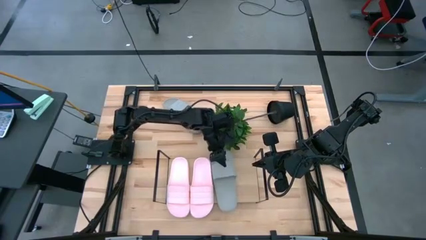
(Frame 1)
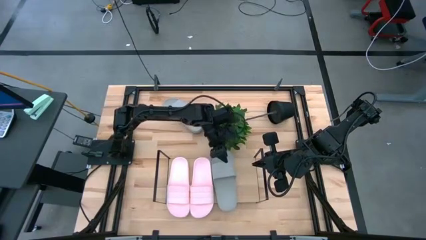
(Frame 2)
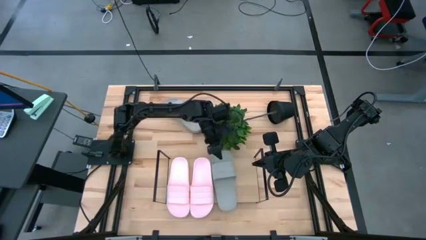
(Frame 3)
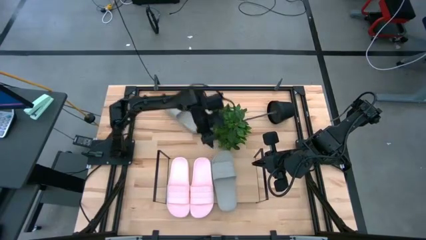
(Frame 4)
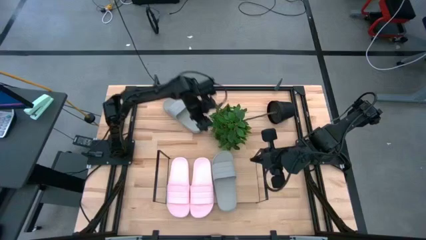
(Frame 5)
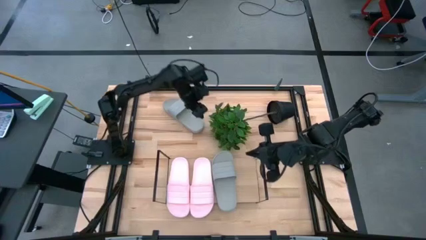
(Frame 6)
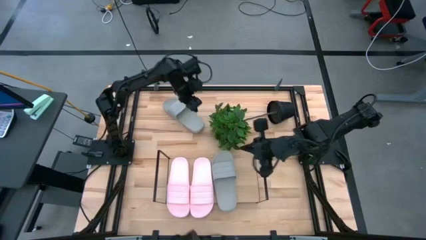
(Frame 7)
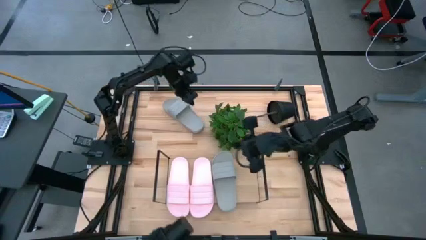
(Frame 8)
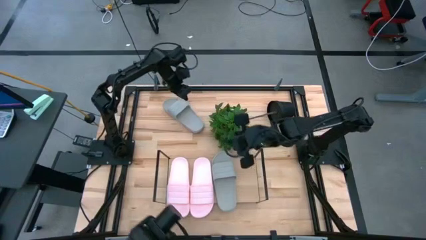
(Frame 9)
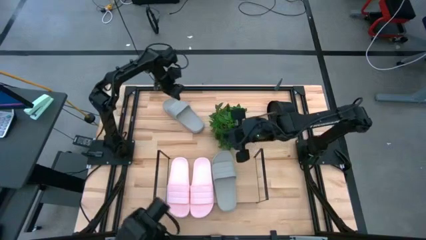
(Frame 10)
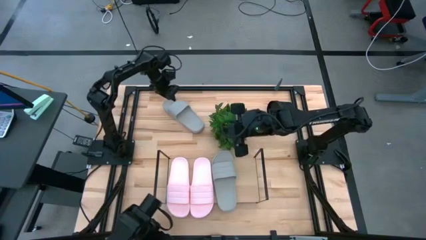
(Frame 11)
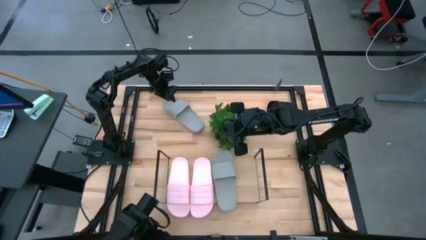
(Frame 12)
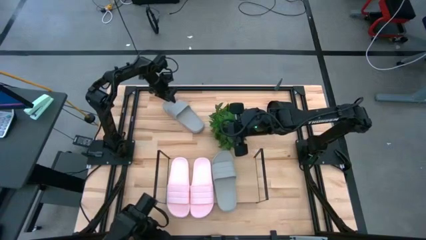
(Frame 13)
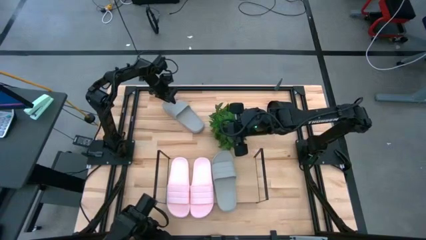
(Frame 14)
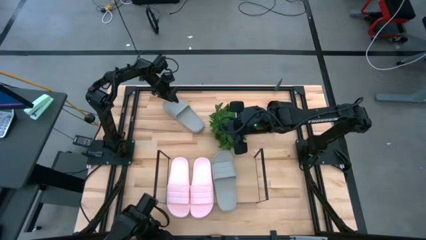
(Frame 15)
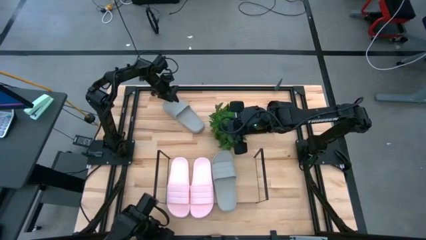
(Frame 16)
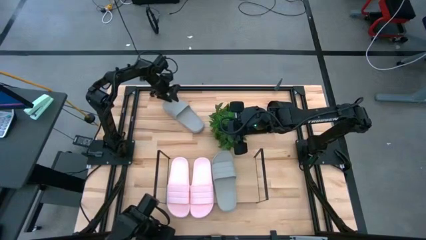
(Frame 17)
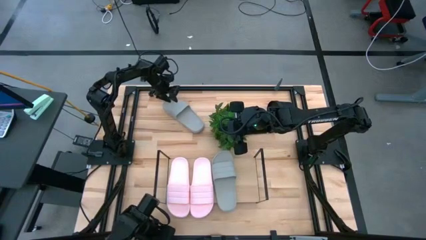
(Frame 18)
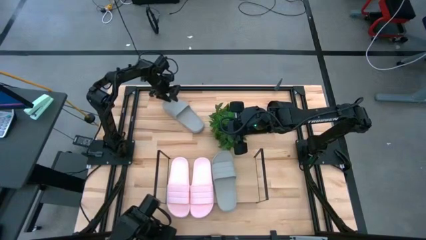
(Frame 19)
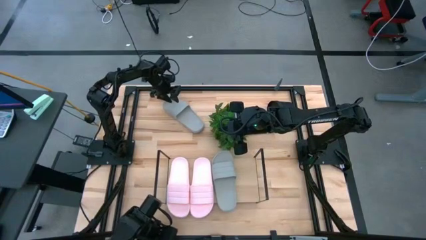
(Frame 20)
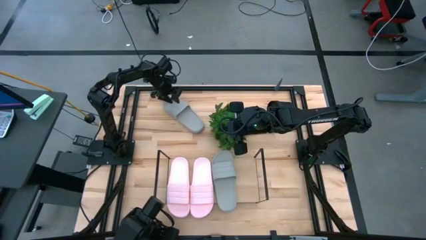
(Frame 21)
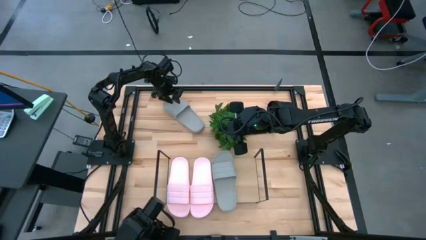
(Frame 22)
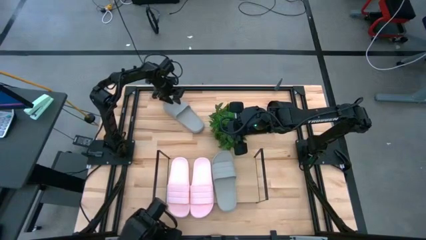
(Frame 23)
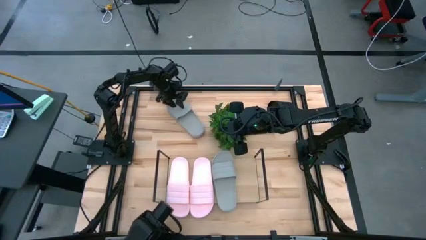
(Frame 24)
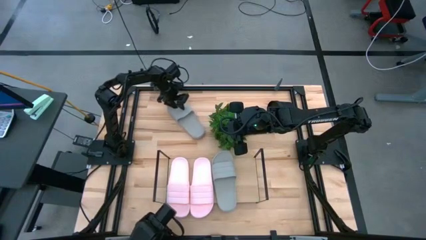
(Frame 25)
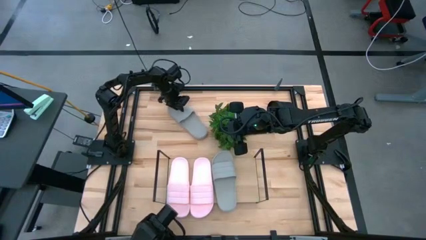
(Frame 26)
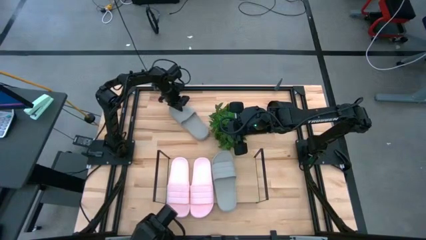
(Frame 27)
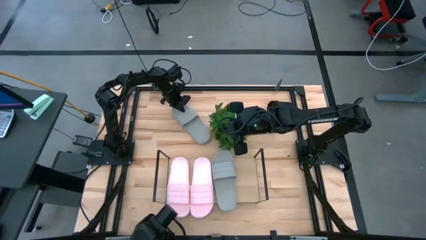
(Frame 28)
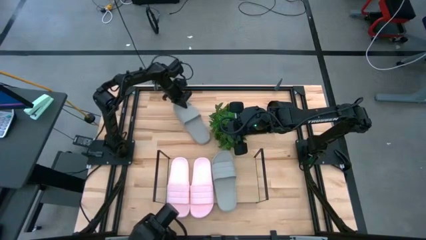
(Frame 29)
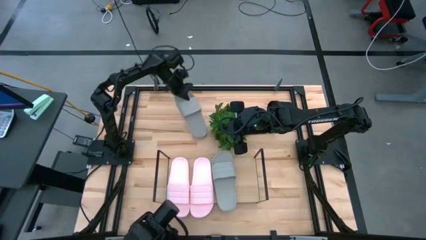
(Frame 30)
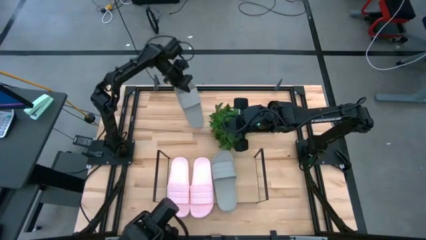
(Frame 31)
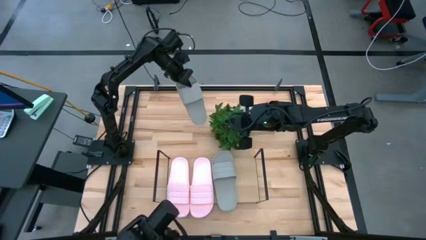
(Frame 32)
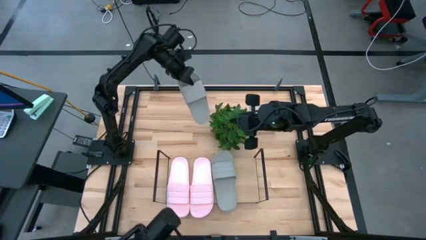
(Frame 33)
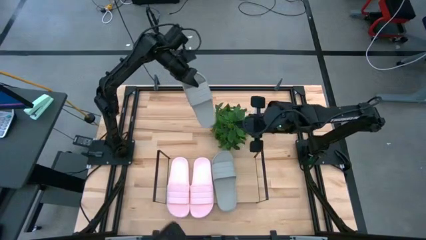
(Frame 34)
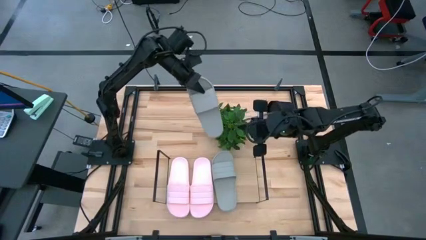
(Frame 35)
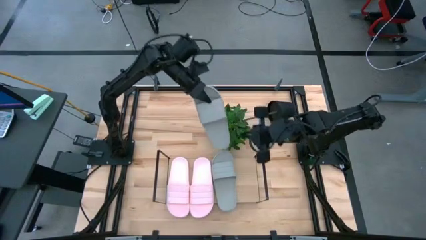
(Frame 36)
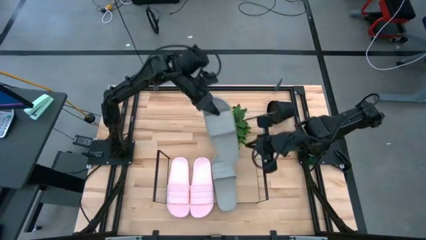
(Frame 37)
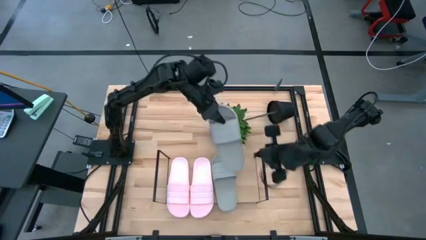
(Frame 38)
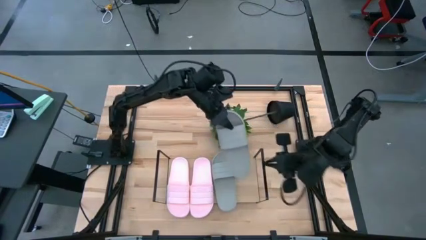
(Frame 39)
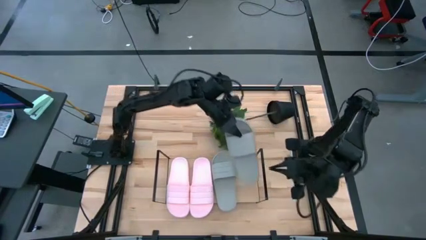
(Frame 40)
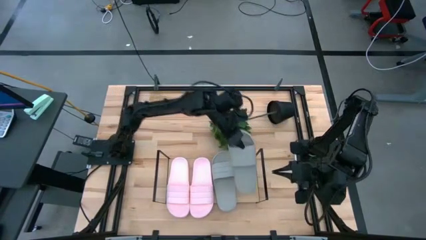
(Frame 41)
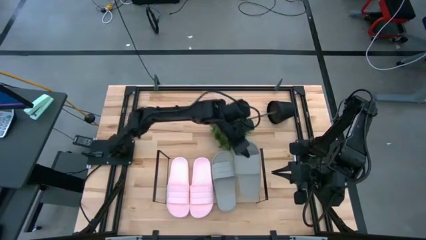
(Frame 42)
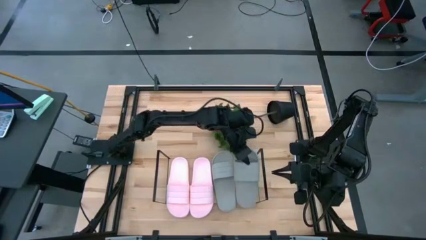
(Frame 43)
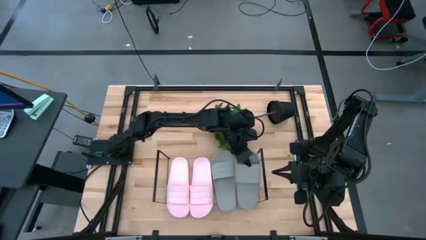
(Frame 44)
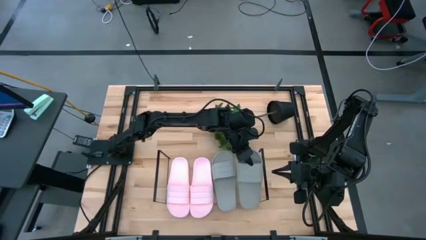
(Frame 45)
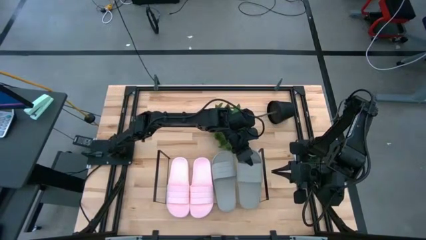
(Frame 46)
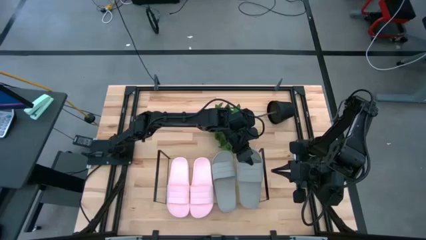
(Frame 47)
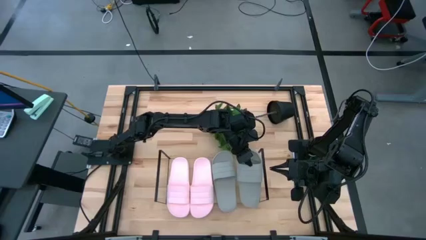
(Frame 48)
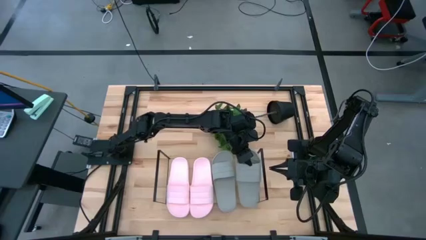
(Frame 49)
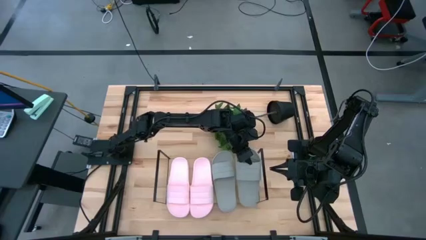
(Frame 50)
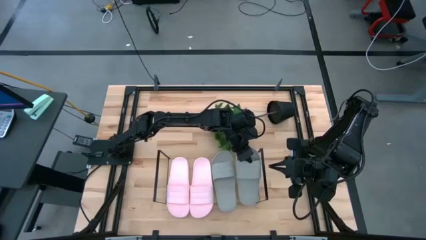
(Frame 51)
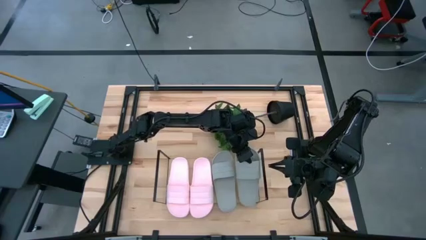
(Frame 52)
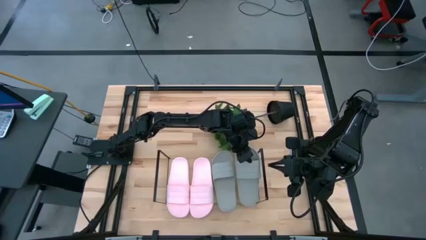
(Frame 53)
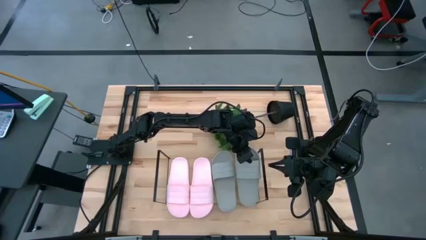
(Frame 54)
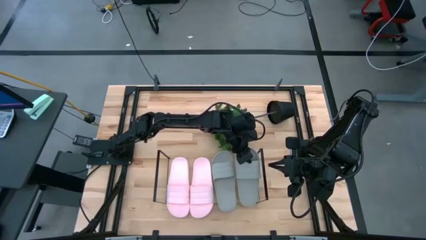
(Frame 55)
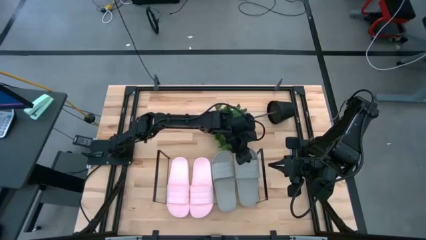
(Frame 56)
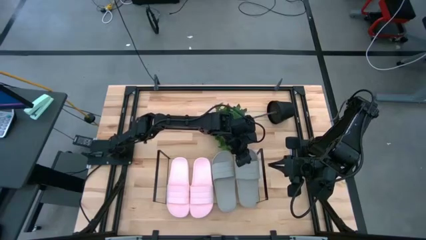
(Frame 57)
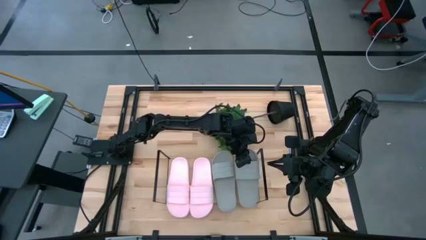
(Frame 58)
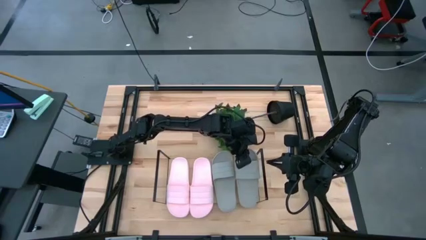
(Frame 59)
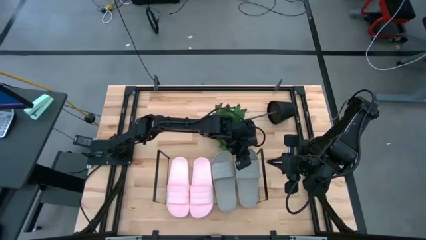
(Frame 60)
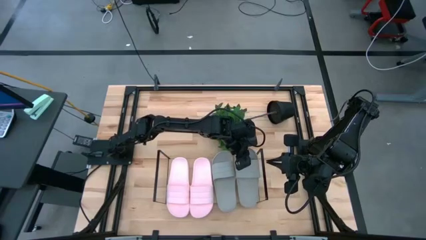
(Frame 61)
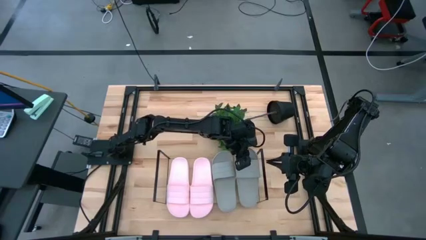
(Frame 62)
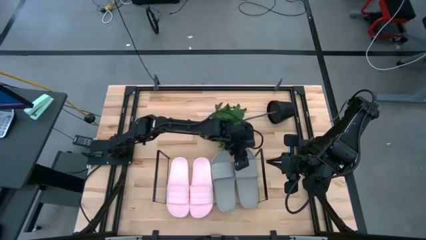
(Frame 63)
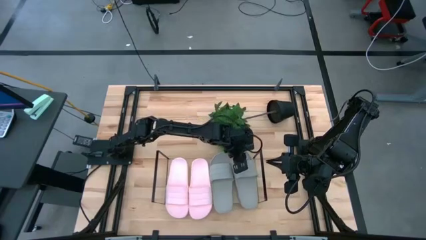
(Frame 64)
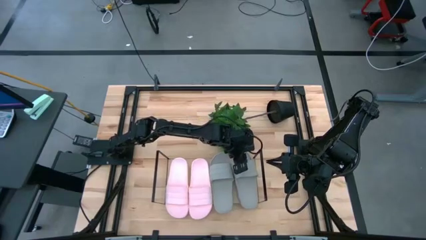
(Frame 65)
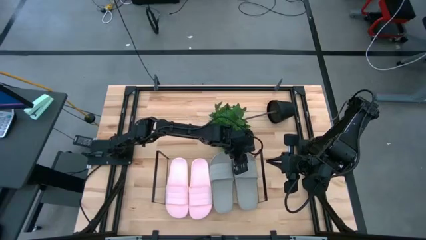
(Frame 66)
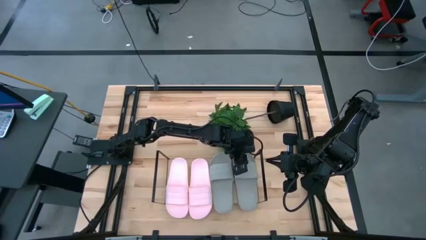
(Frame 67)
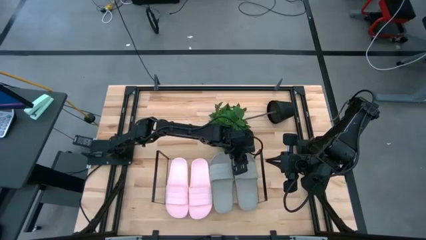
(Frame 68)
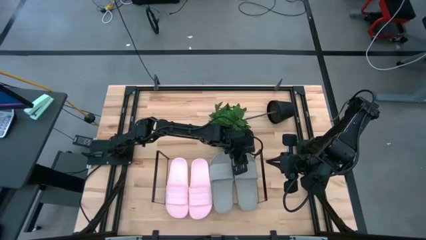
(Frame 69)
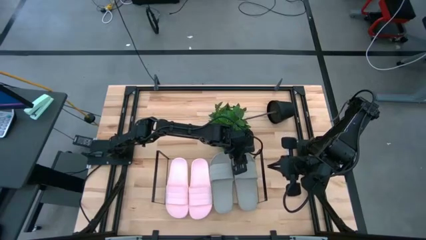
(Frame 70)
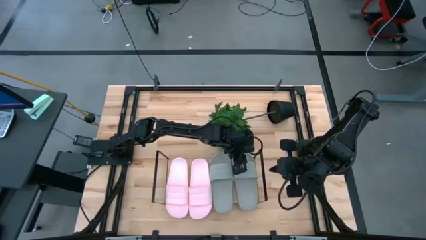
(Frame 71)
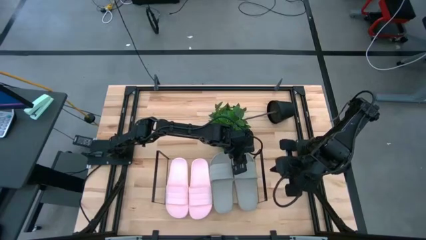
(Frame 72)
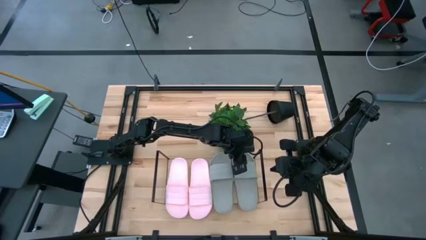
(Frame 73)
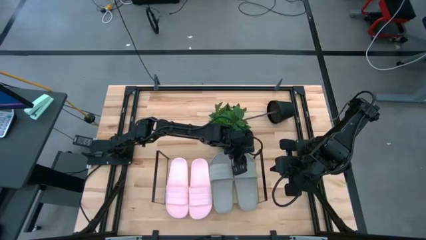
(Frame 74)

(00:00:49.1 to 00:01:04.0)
Task: Pick and place slides into the shelf
Put the gray slipper on the shelf
